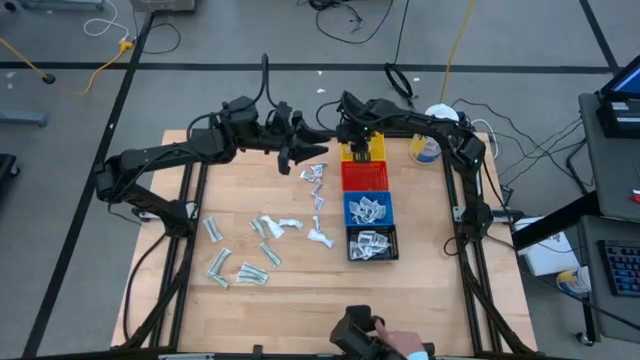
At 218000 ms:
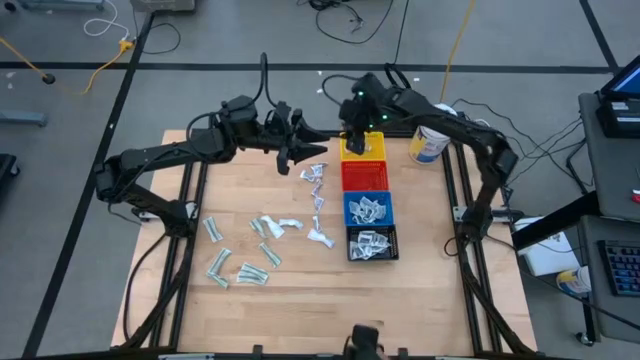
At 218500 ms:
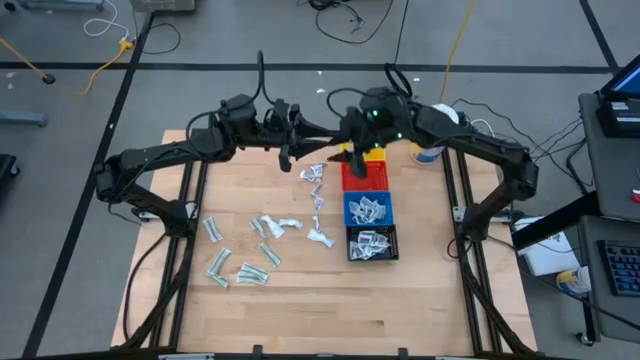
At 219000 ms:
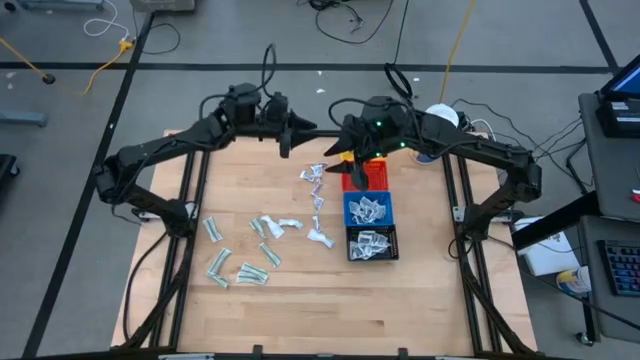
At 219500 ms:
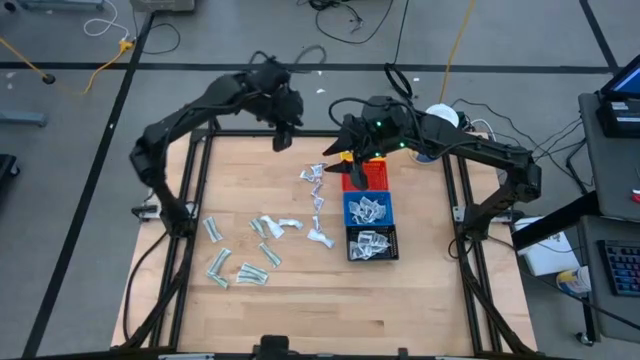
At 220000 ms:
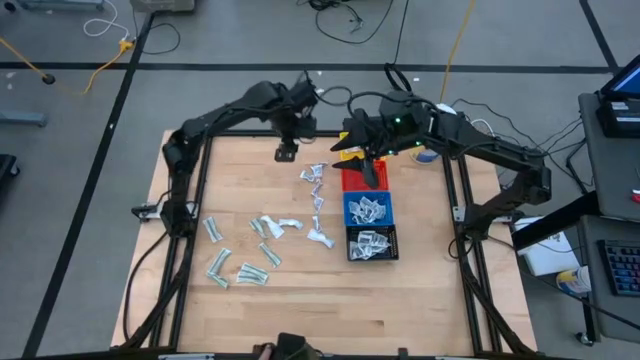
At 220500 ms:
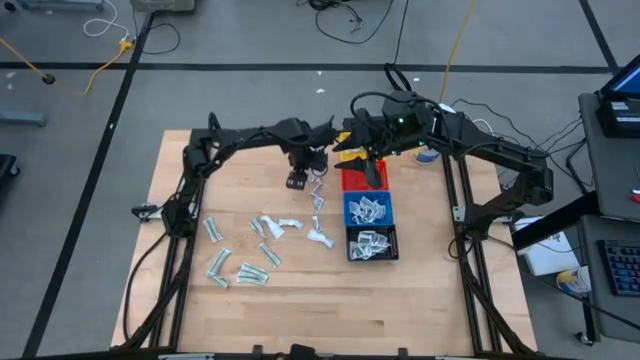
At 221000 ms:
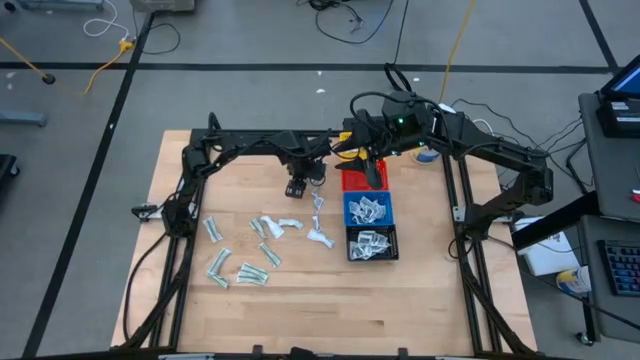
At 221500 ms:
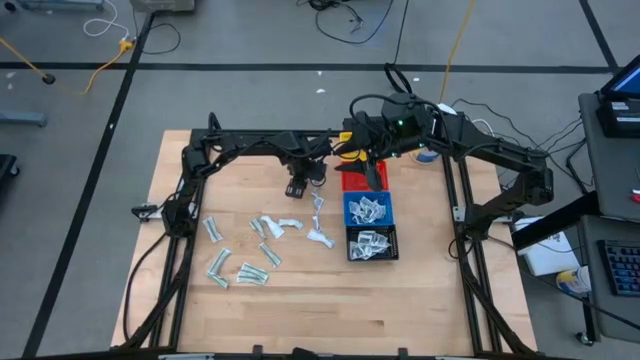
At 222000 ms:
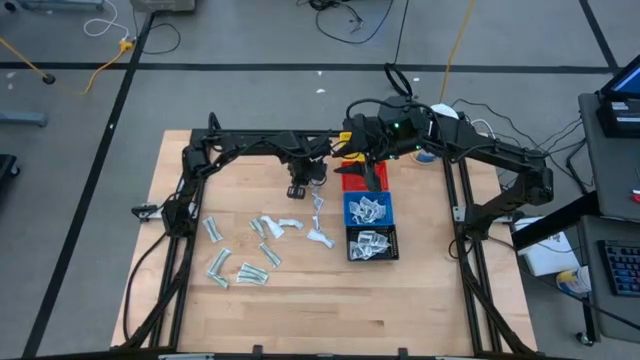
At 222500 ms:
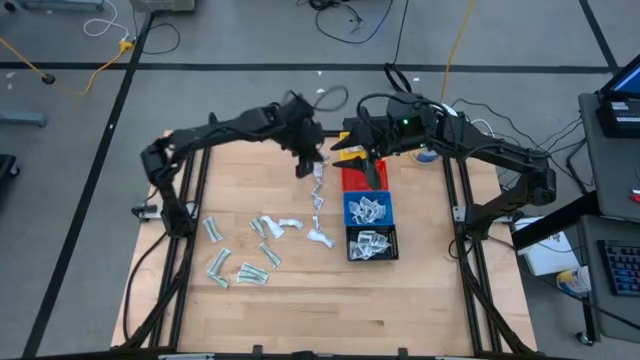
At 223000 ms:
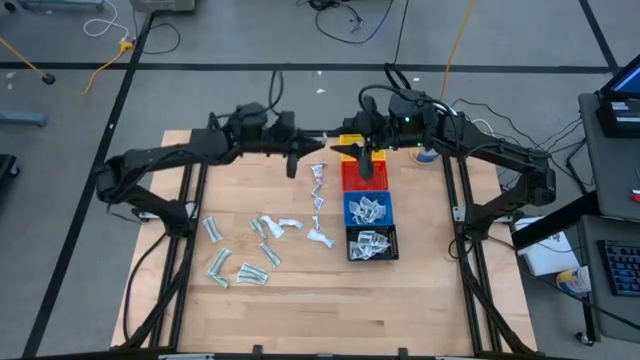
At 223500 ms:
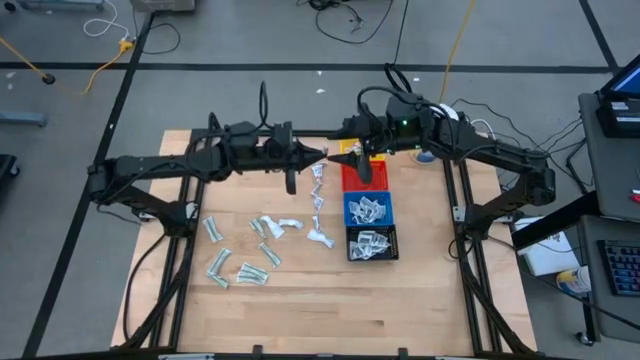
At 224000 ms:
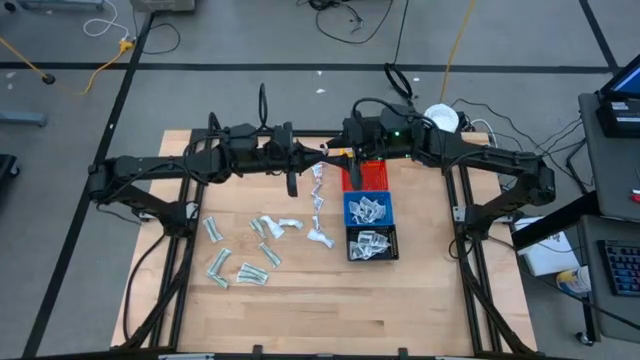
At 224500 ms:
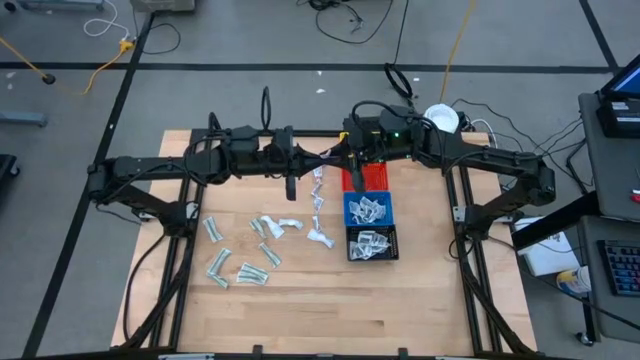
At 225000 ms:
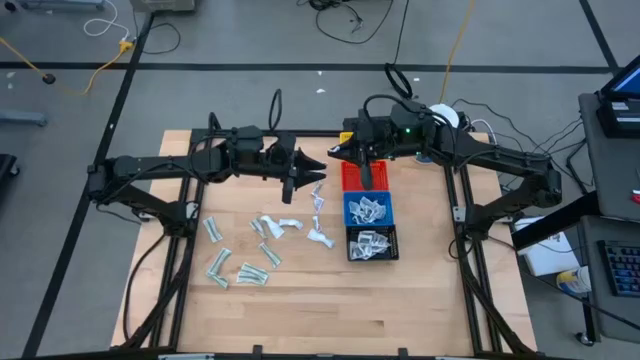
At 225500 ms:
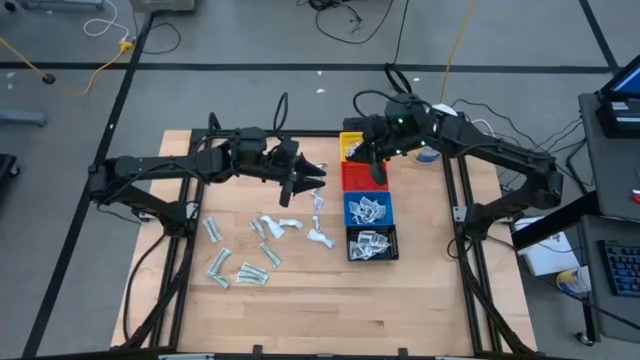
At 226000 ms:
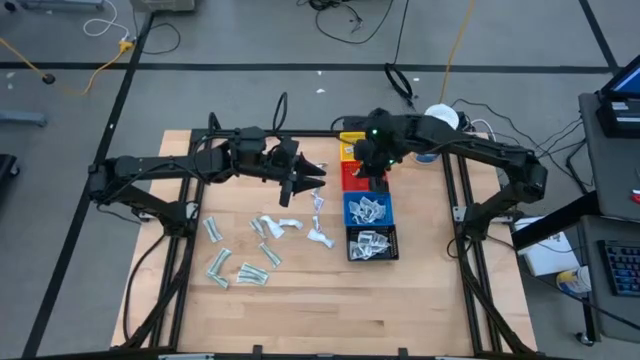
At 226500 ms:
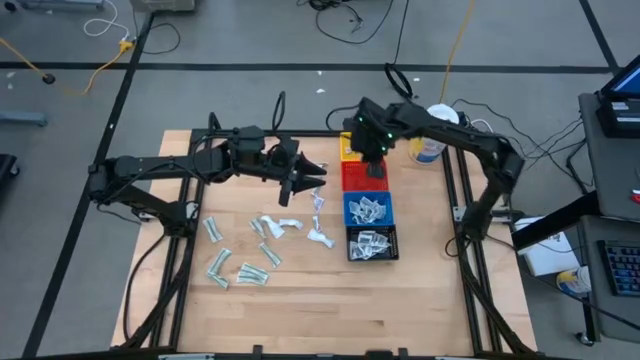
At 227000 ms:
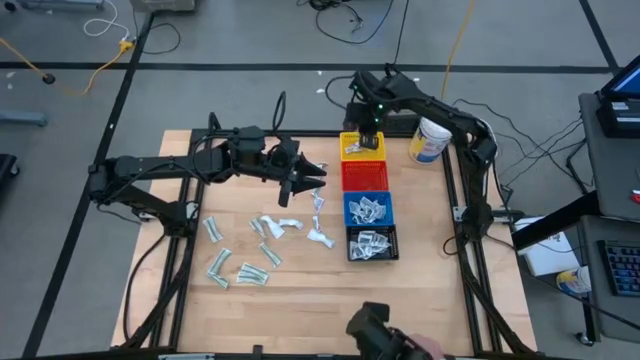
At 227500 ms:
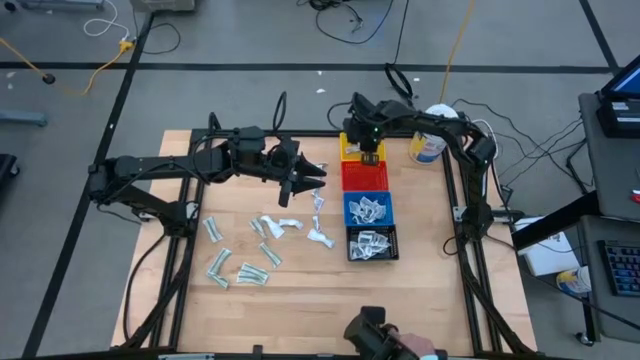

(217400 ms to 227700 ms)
Task: Pick & Place First Aid Supplies
Put the orange ointment pack into the yellow bin

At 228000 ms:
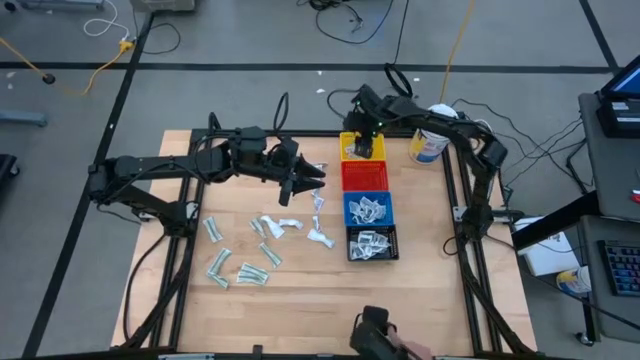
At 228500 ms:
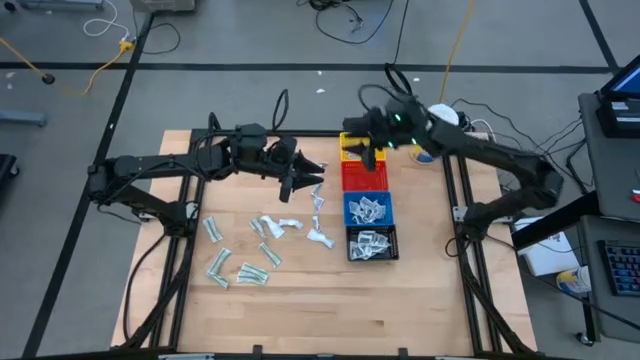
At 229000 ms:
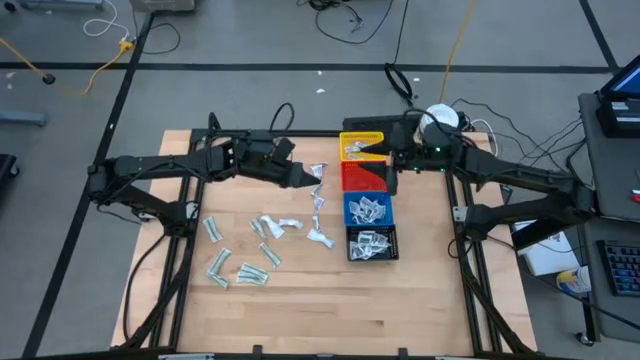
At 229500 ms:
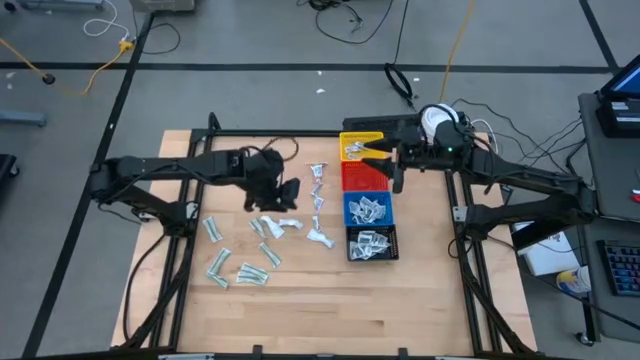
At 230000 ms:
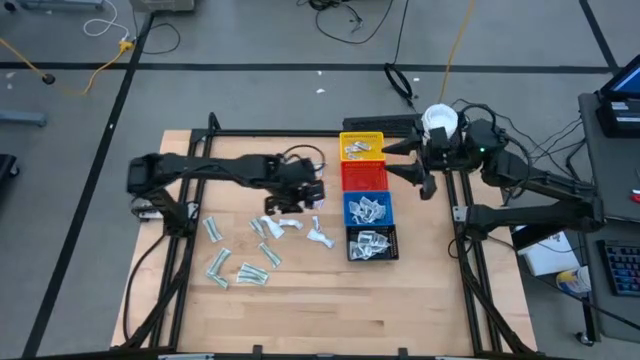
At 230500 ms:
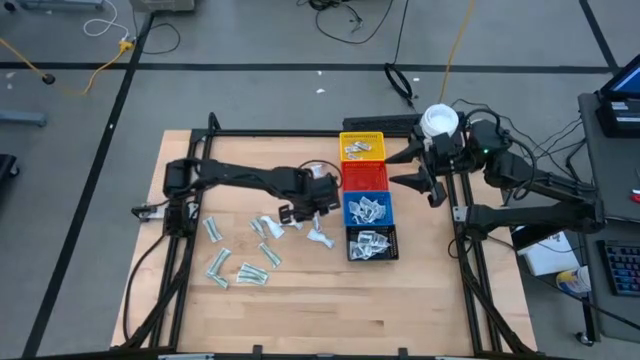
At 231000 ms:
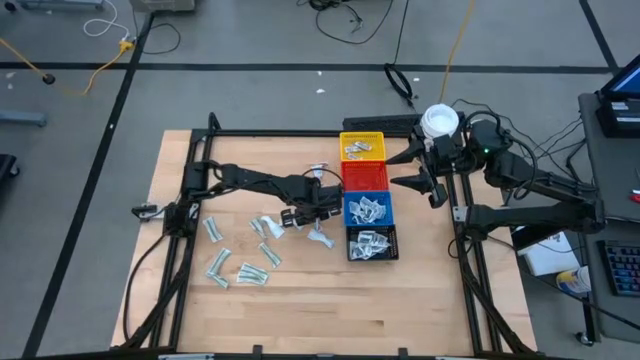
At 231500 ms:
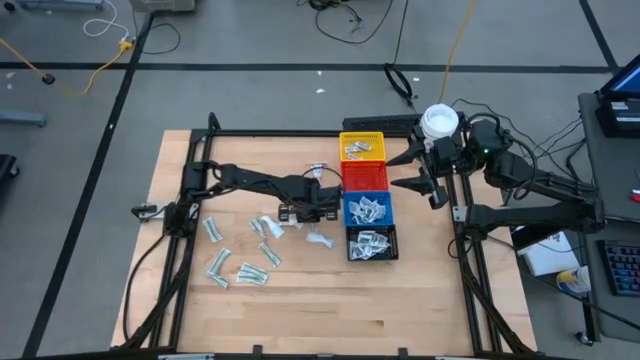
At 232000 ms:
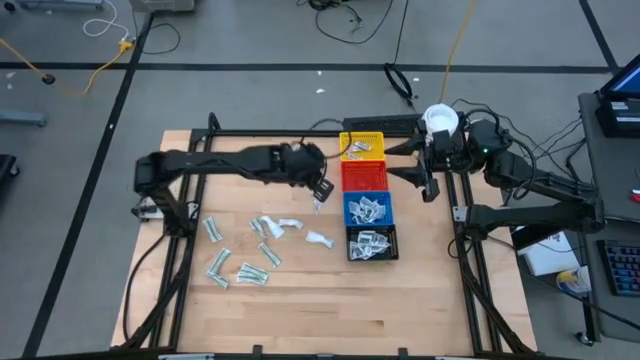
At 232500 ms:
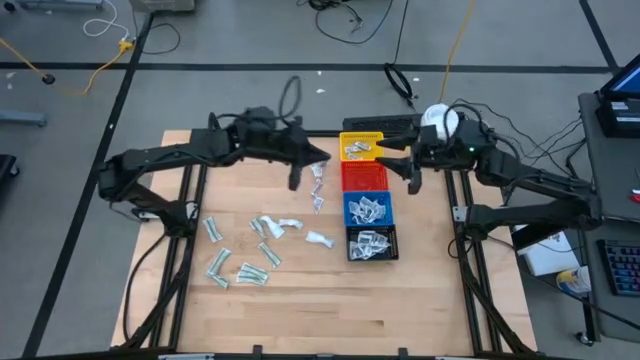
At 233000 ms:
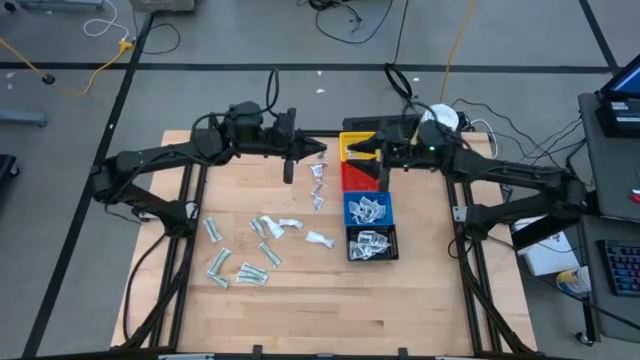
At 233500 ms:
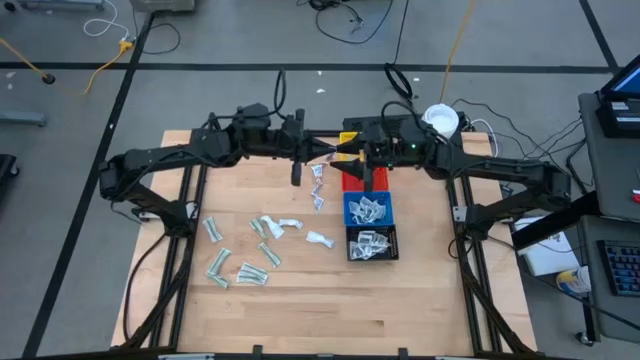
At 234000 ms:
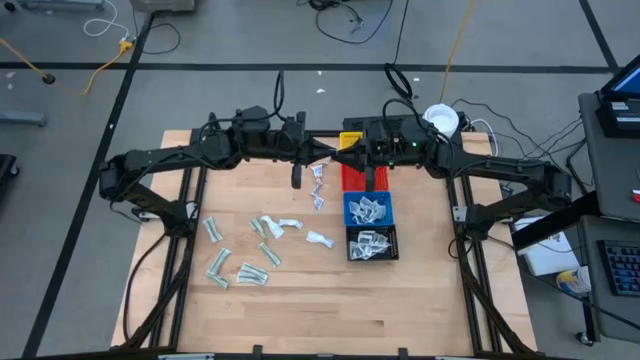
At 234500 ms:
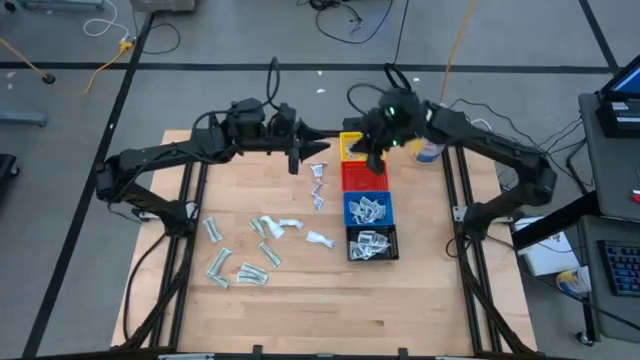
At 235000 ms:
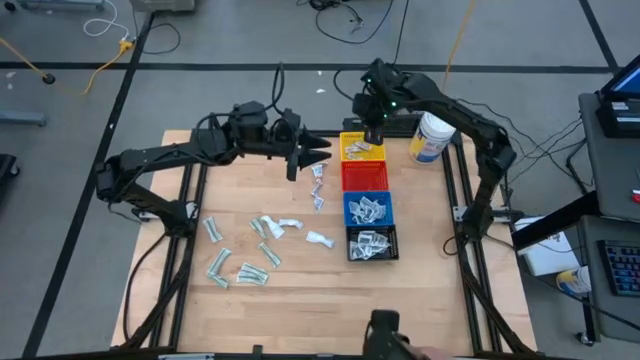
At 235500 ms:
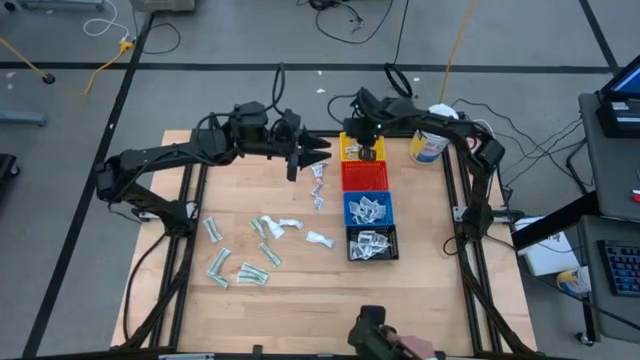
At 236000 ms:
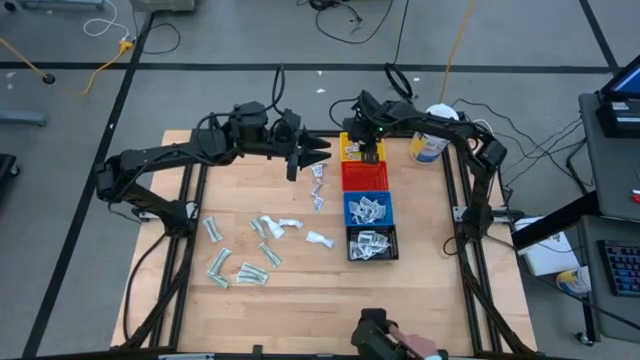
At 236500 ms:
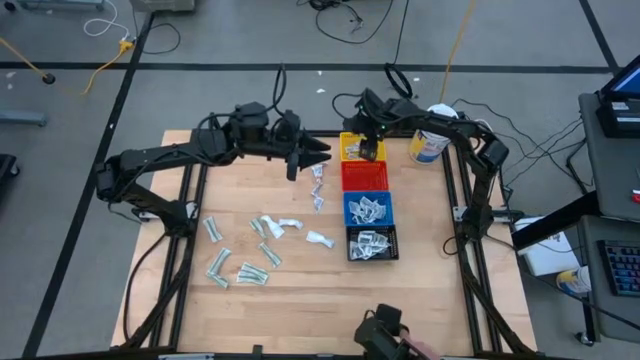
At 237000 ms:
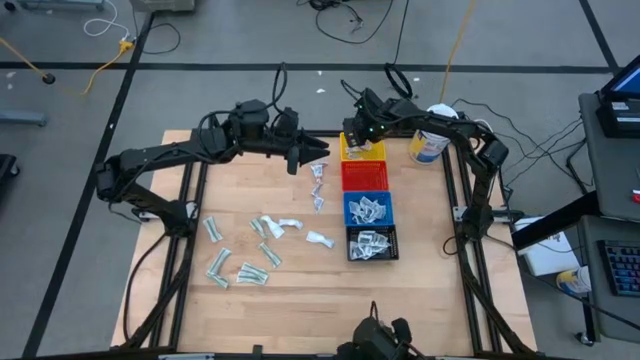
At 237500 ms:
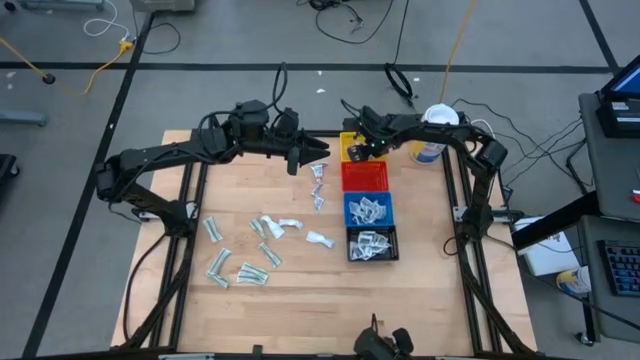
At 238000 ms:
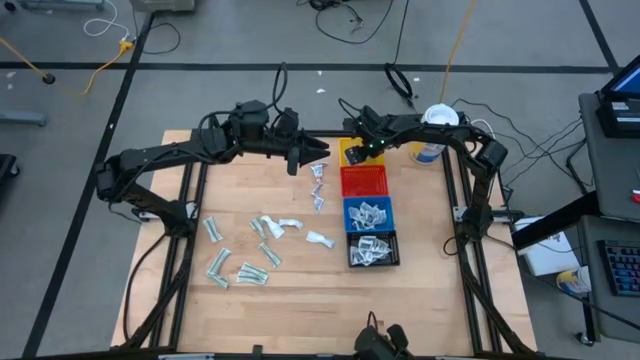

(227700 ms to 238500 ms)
Put the orange ointment pack into the yellow bin

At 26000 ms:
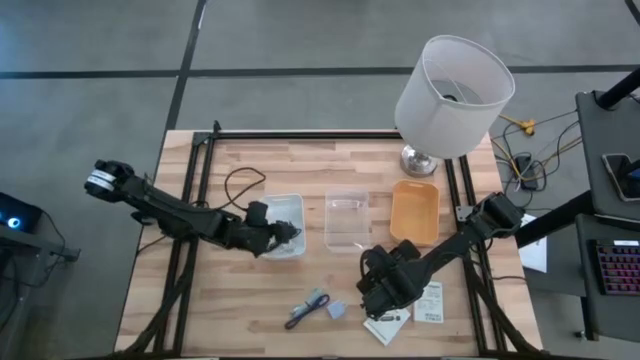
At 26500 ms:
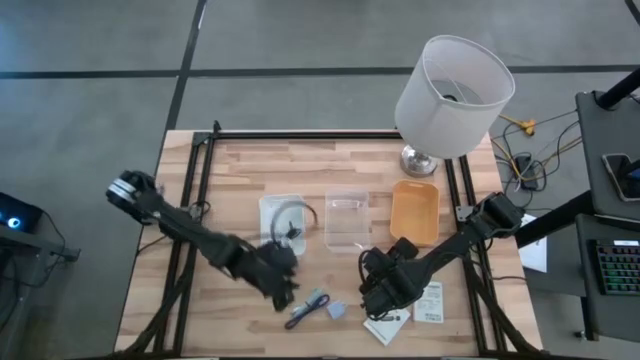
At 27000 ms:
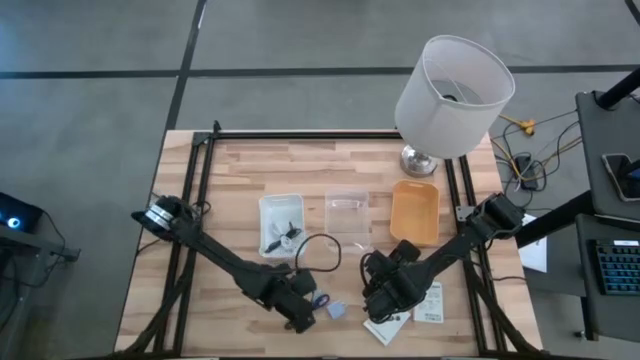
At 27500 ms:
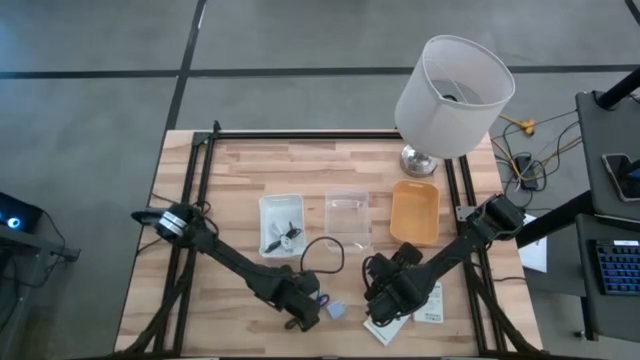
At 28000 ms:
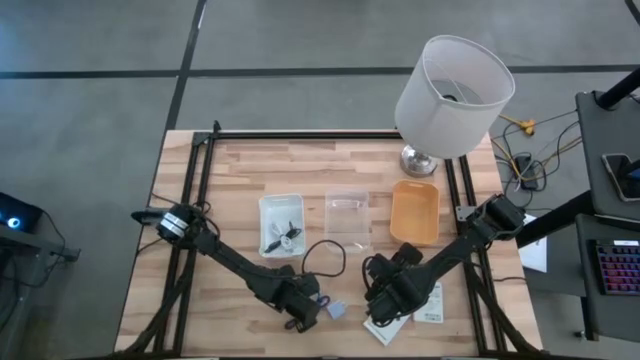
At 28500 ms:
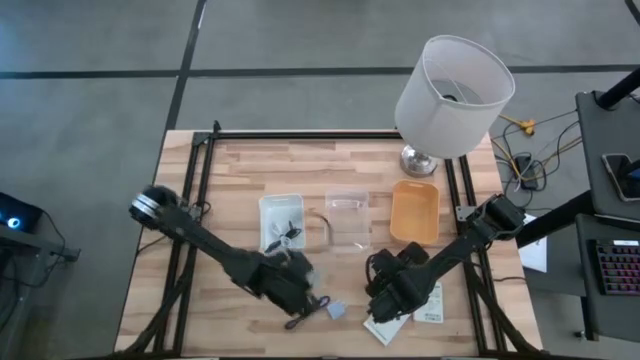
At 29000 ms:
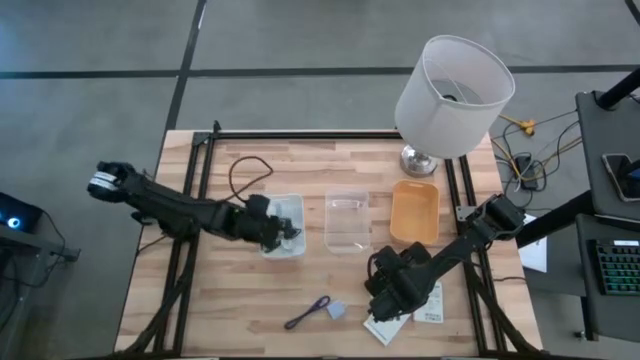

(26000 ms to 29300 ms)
Task: Pick and place items into bin
Put the light blue charger cable into the white bin
